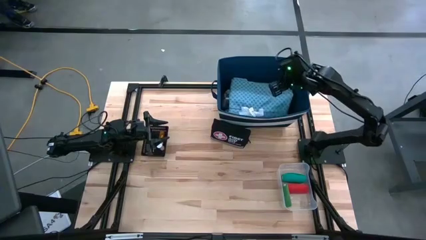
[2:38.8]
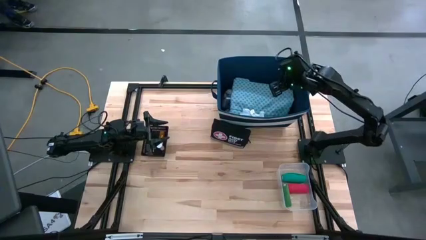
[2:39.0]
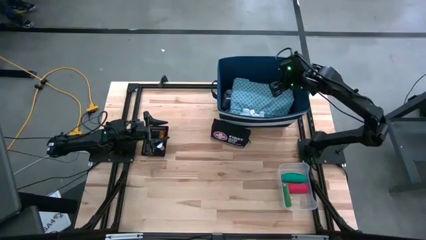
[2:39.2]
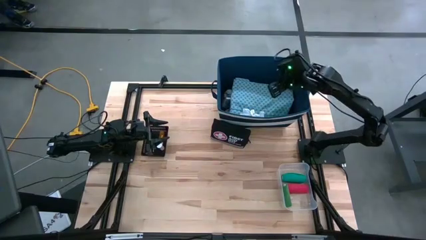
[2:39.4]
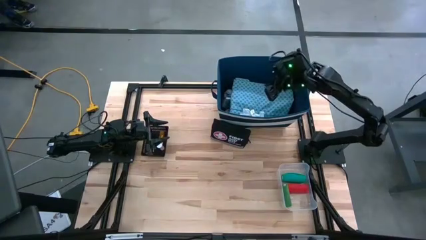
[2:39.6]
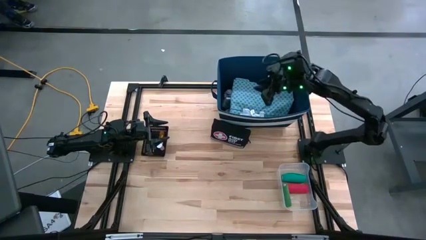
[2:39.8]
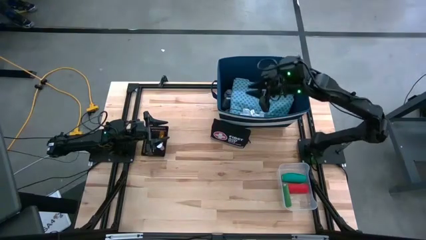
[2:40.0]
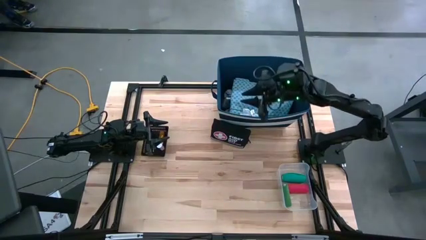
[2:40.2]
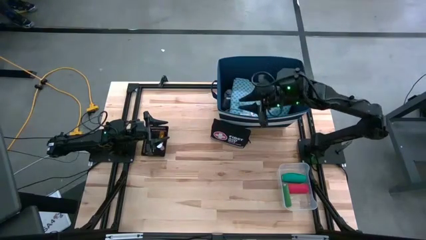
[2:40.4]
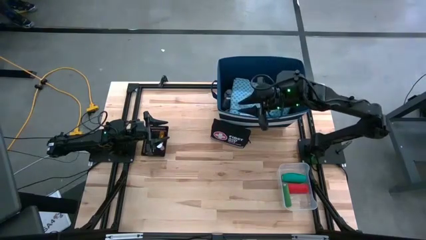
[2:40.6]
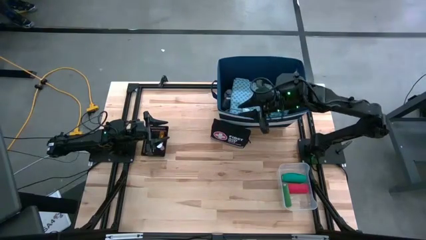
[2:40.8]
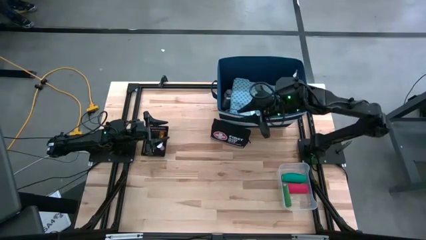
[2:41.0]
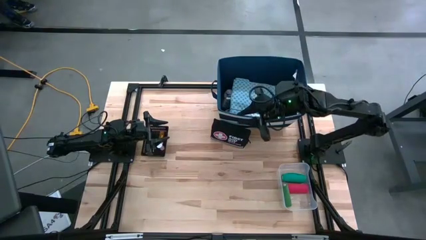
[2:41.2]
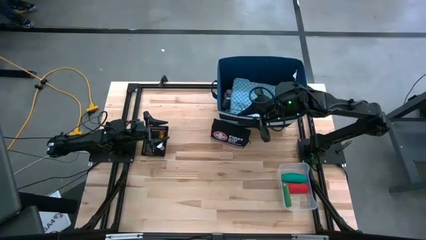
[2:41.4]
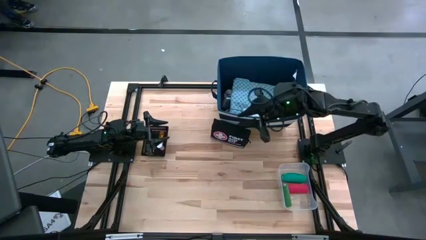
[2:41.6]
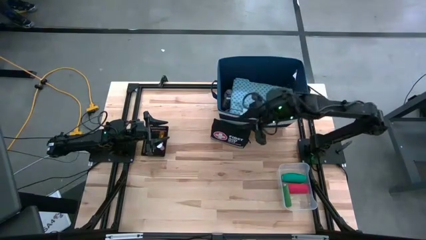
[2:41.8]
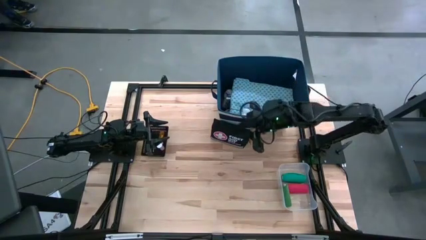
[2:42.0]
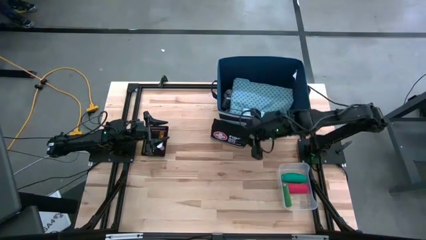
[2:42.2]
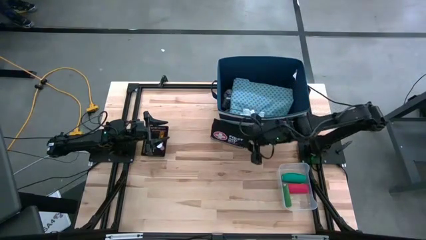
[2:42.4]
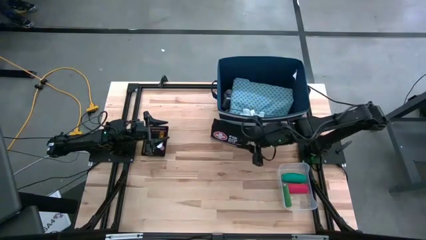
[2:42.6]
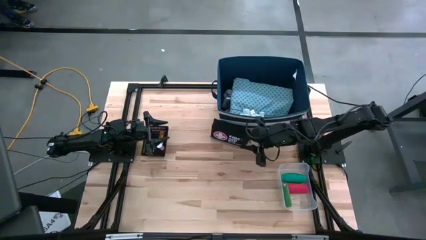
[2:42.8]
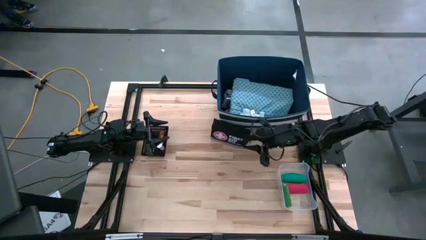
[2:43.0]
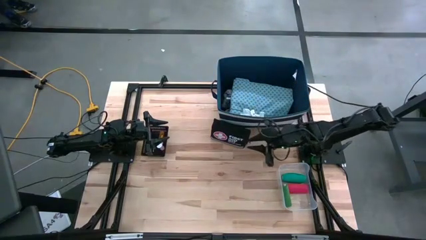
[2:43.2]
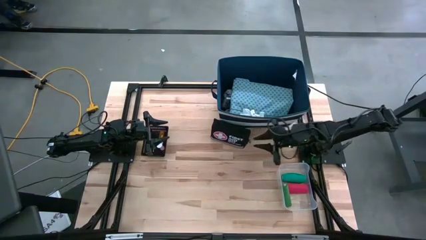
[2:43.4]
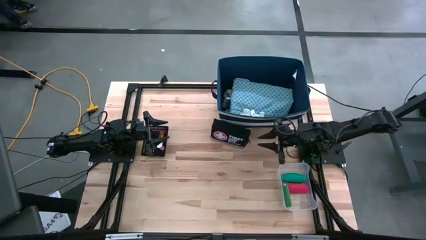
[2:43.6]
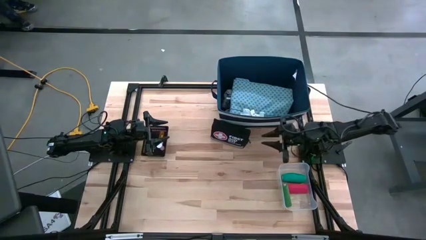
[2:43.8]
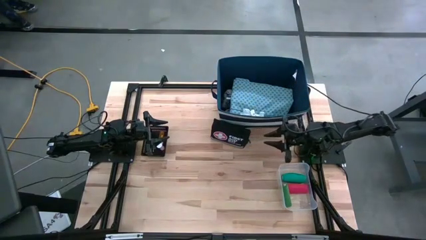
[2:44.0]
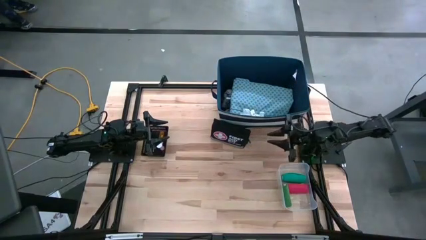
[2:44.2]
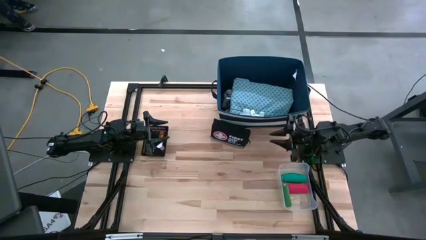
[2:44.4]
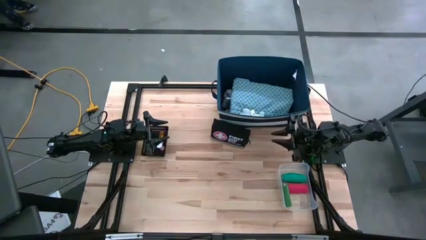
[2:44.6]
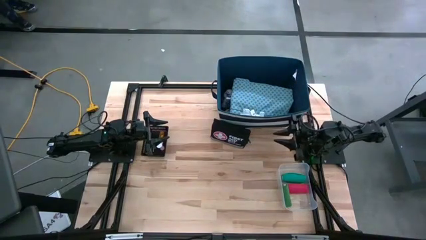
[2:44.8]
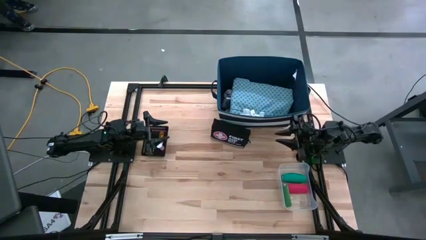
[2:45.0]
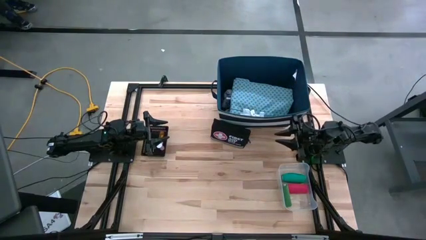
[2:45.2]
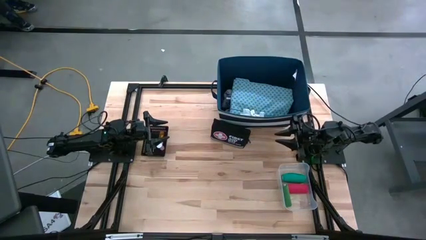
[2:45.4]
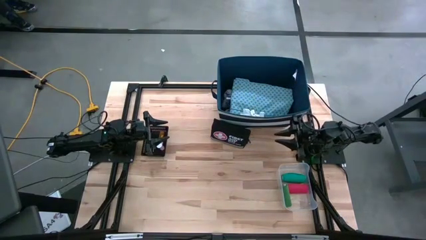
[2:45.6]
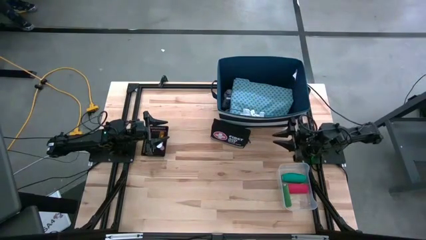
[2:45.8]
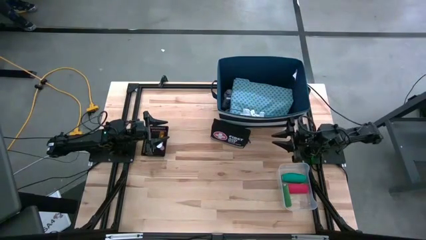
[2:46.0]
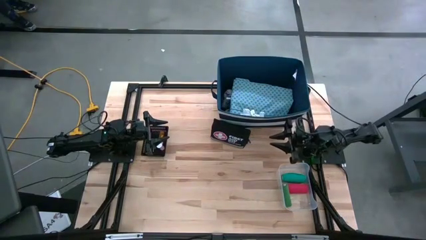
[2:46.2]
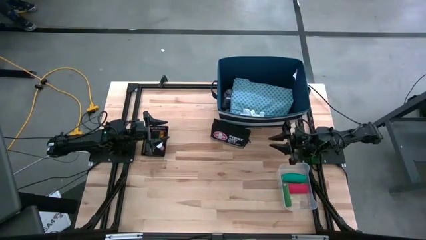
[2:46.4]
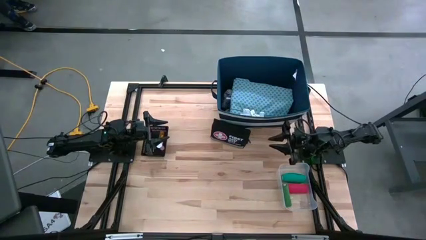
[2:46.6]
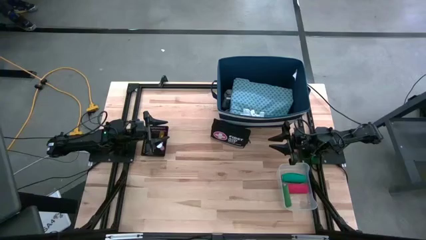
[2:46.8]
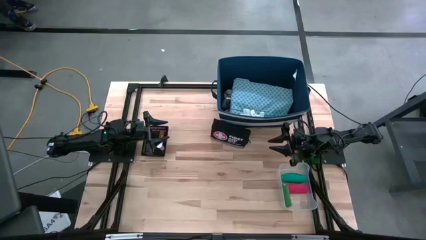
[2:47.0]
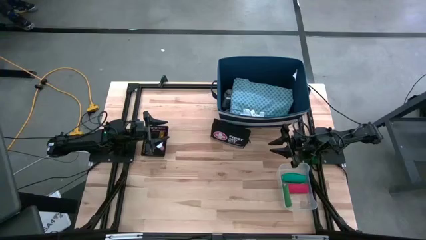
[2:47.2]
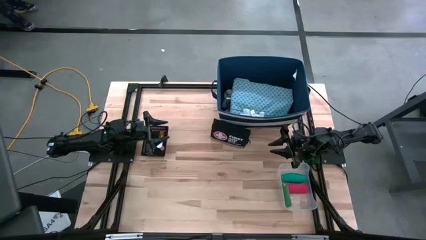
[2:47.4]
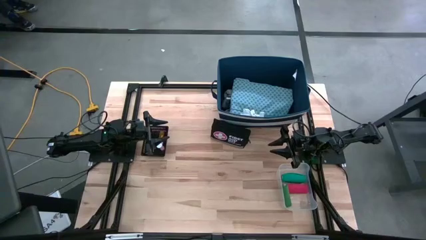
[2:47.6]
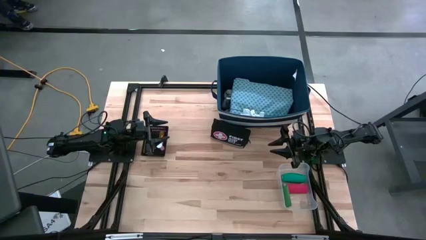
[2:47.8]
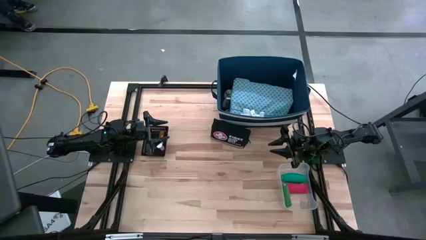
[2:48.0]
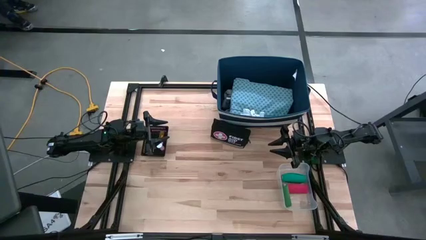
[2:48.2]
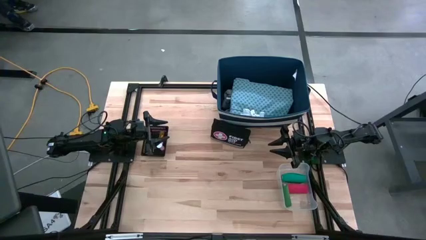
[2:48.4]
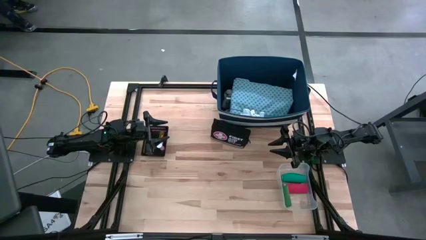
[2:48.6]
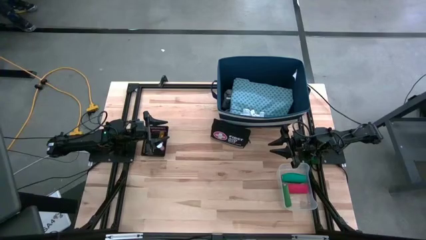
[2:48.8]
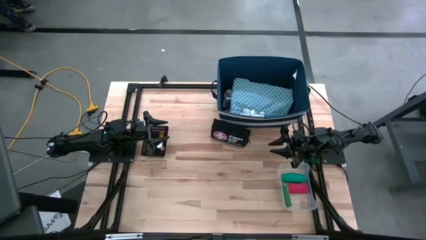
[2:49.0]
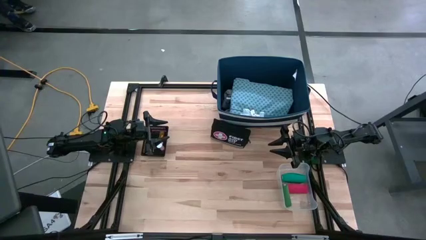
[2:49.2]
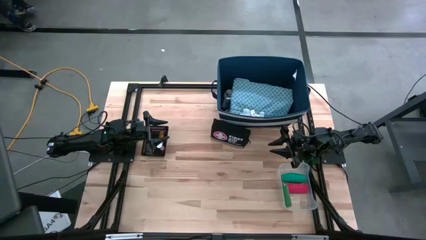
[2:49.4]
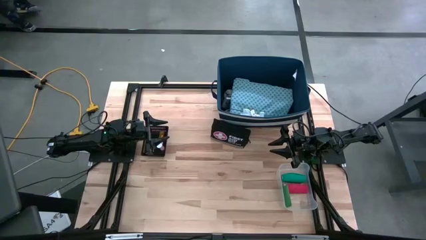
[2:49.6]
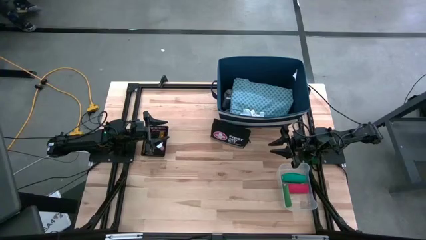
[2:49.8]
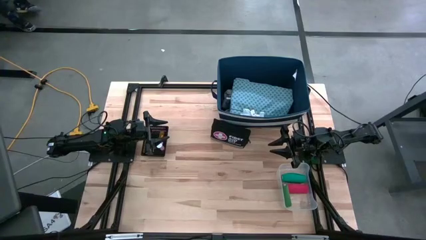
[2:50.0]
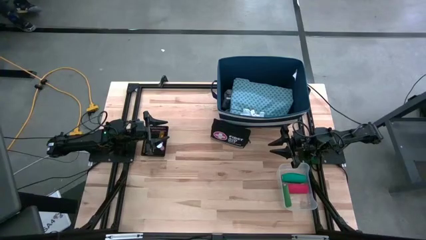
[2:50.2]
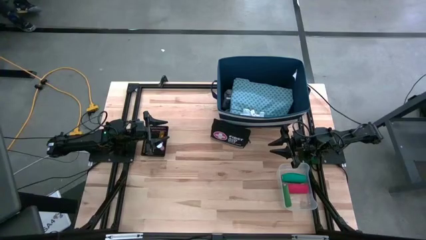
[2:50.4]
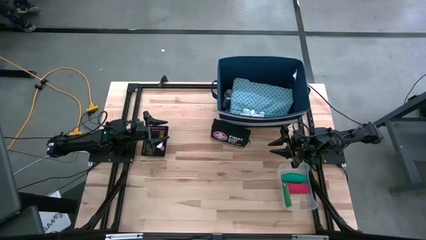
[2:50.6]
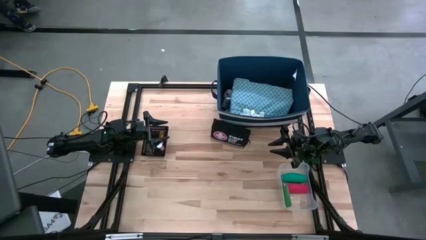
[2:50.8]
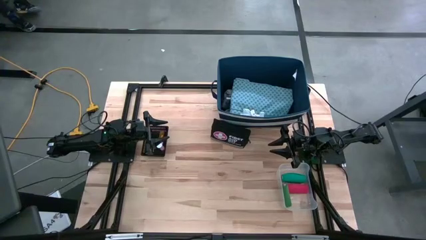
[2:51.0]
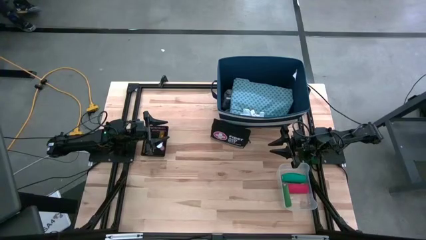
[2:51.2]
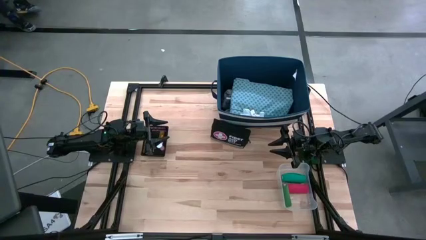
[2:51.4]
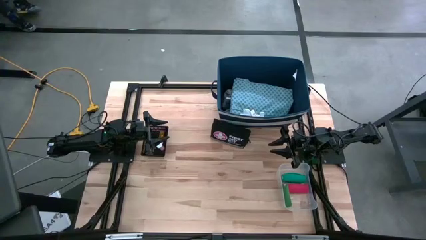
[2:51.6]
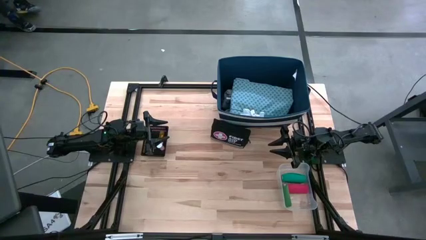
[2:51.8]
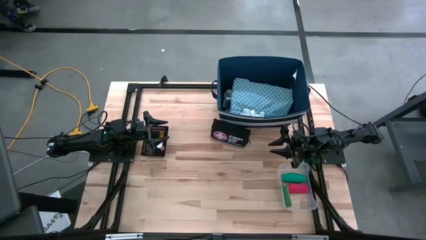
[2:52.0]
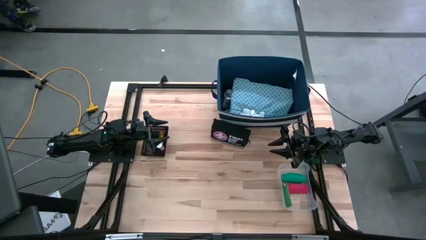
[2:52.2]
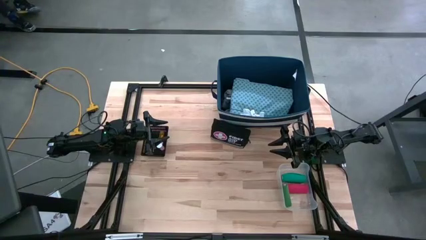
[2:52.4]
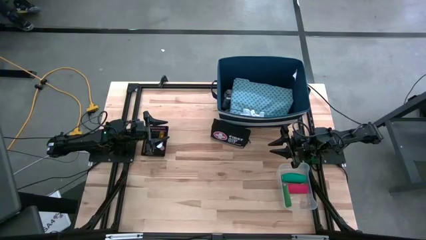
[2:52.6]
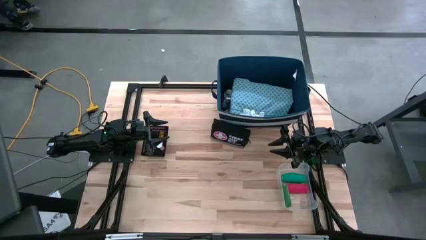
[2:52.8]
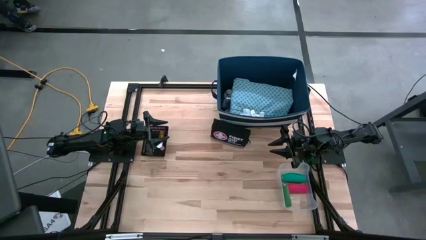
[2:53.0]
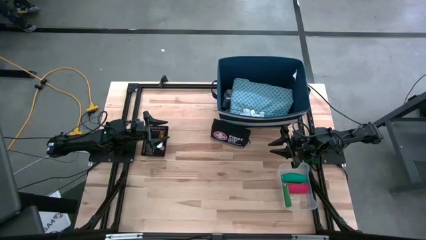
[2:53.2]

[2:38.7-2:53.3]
Task: Pick & place medical supplies in basket/bin
Return to Home Position
